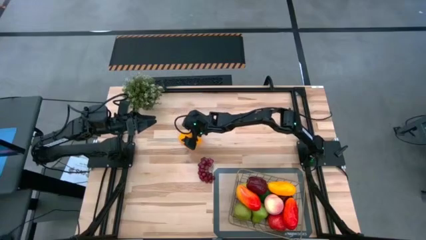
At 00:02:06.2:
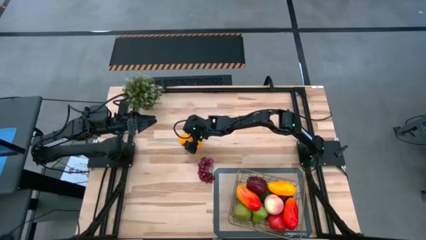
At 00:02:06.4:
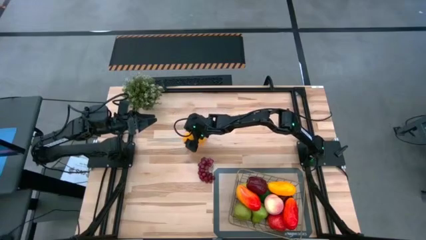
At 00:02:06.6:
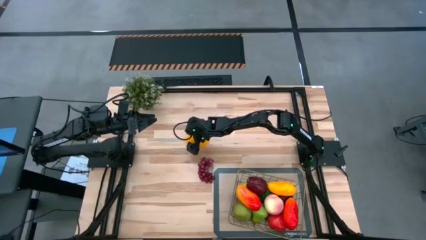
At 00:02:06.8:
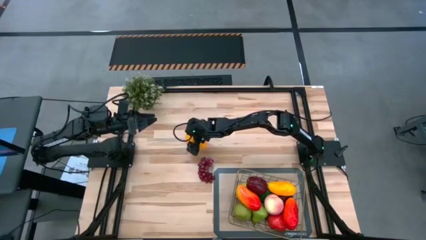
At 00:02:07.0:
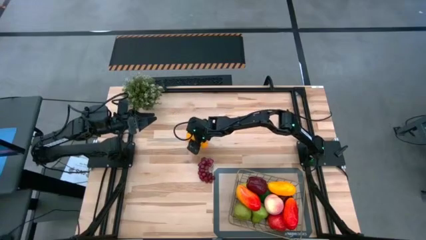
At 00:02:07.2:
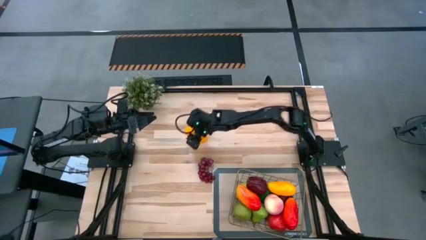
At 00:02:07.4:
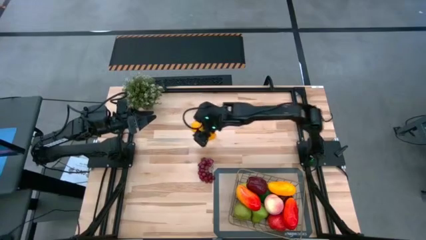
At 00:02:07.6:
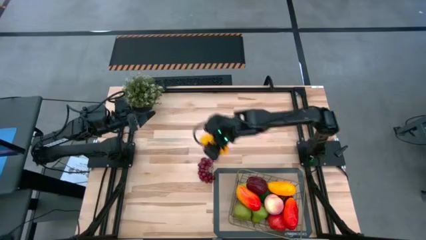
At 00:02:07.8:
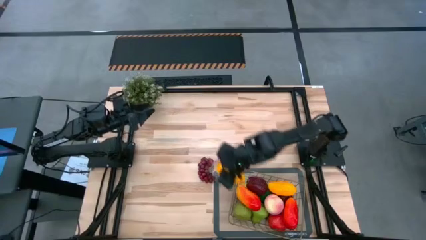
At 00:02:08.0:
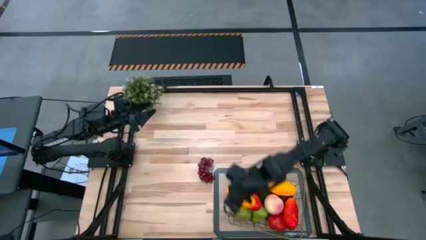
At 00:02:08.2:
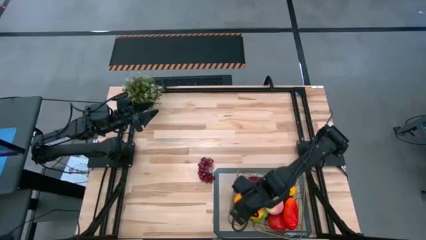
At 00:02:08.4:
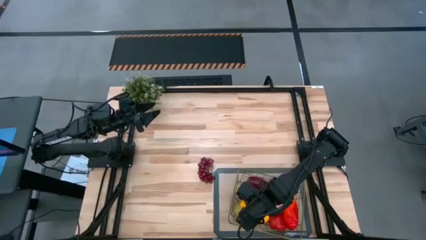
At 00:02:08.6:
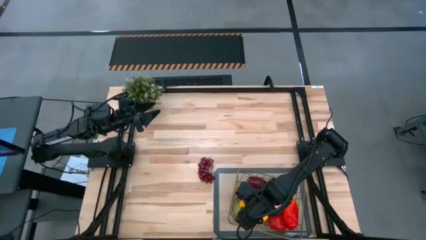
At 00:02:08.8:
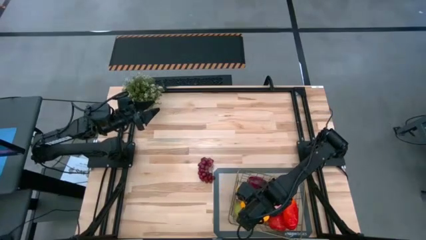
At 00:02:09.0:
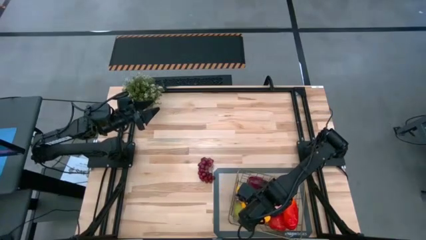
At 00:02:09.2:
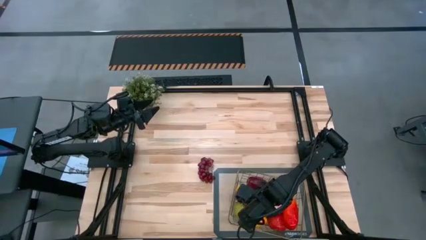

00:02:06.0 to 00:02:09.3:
Task: Build produce basket
Put the yellow mango into the wire basket

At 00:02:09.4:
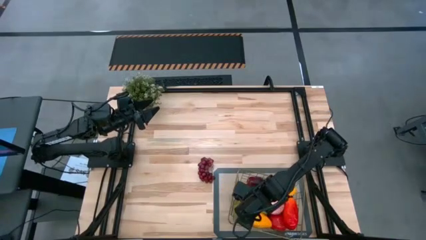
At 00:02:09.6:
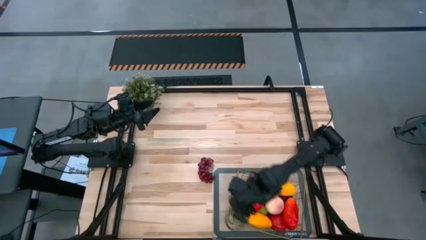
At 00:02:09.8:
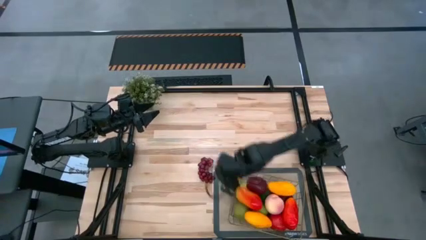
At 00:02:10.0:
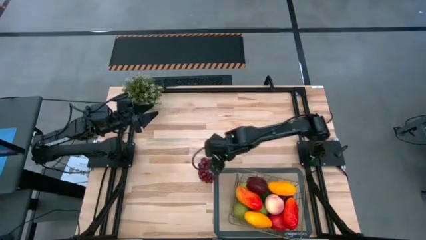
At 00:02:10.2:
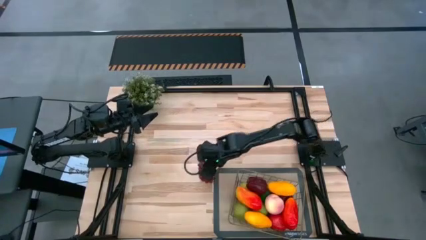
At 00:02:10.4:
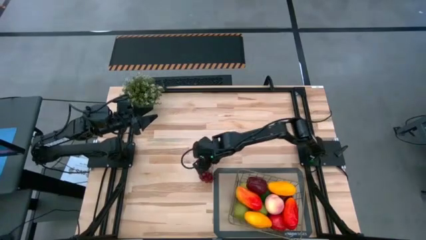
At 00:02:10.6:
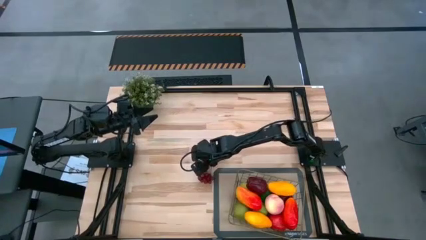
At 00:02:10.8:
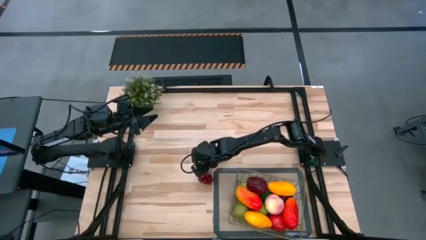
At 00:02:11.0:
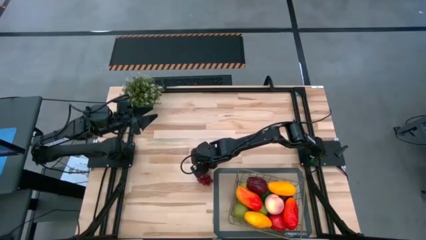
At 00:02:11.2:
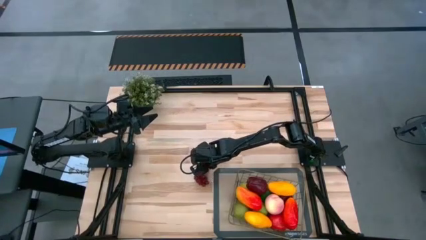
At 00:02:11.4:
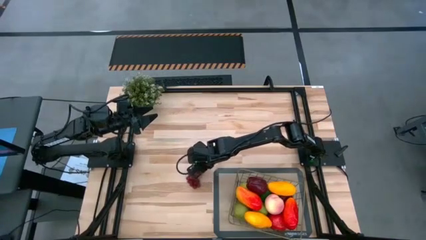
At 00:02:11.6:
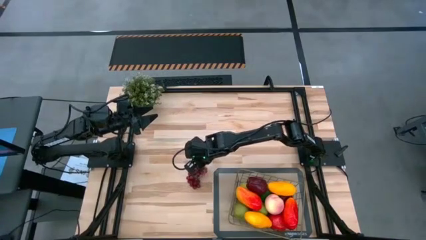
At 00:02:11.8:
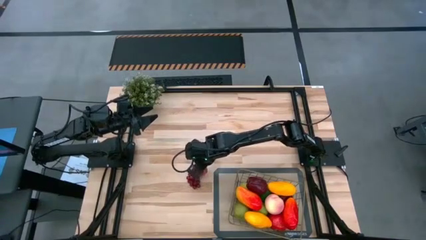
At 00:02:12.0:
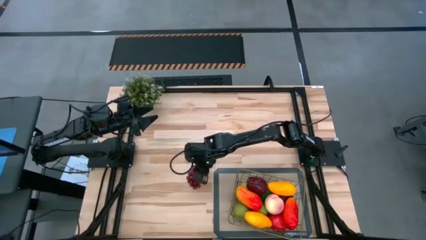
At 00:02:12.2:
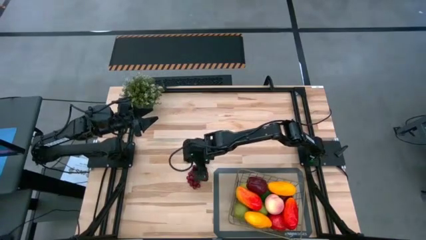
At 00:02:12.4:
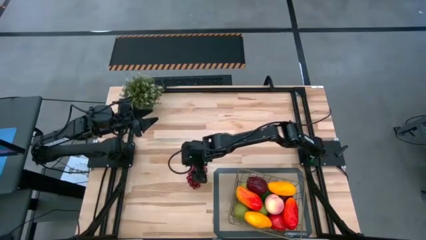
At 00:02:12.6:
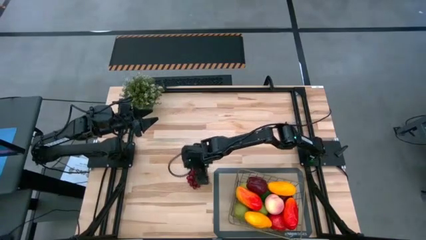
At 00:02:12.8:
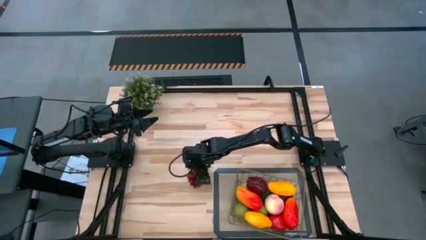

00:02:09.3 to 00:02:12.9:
Put the purple grapes into the wire basket

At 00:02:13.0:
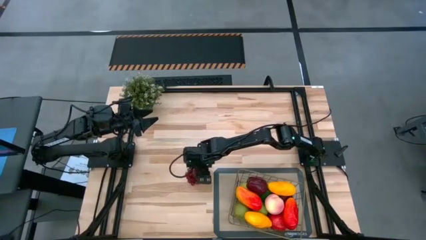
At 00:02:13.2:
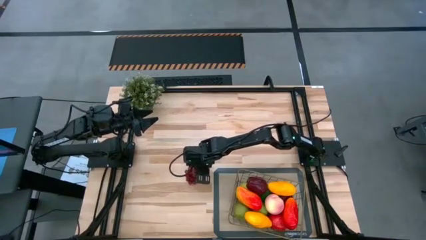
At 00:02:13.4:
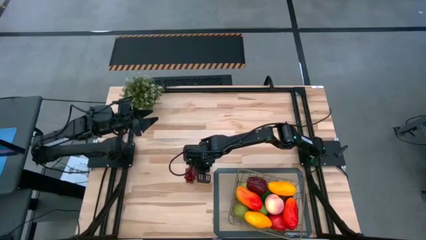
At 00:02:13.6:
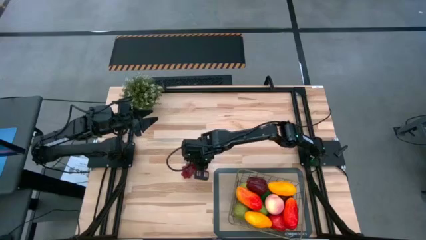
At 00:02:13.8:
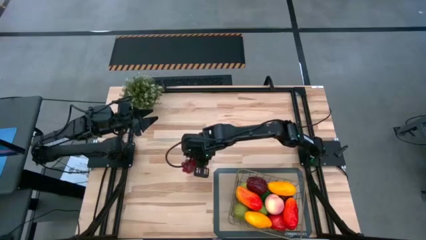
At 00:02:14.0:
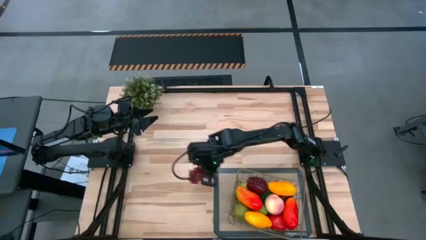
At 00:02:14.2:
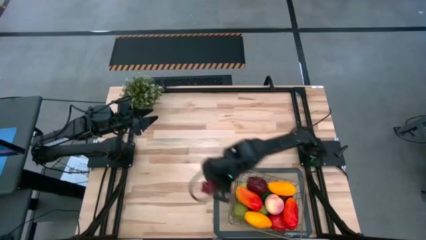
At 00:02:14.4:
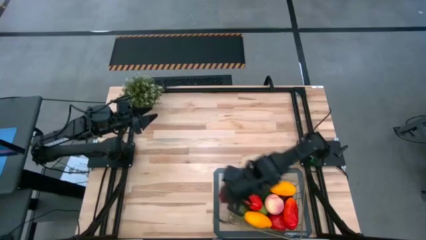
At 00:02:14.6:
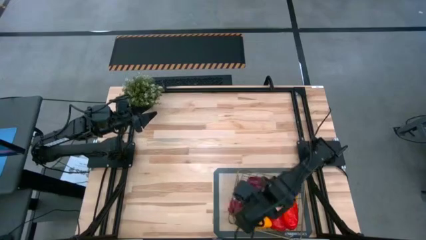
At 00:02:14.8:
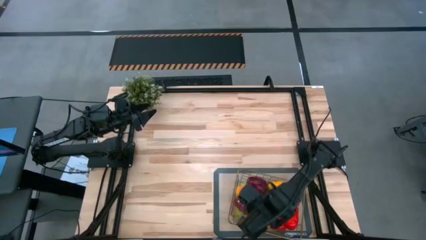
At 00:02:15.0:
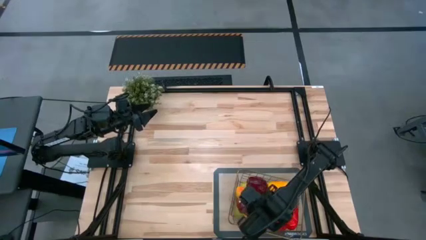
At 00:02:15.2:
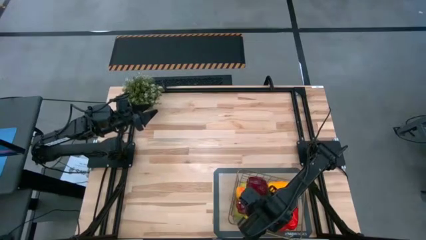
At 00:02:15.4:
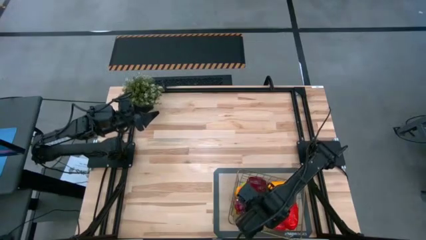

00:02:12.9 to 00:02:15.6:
Put the purple grapes into the wire basket
